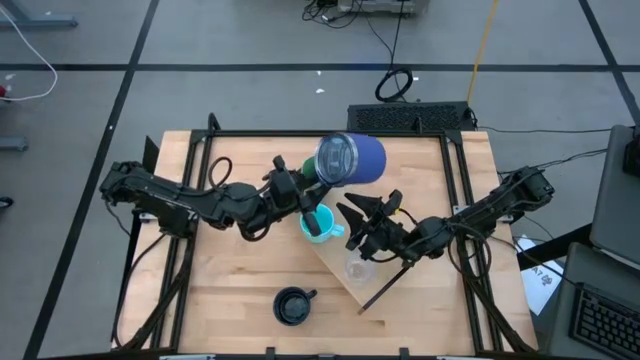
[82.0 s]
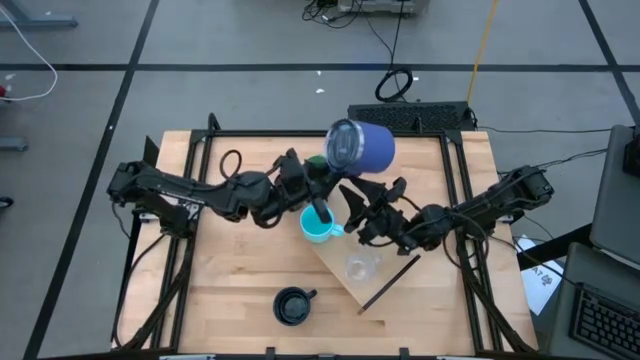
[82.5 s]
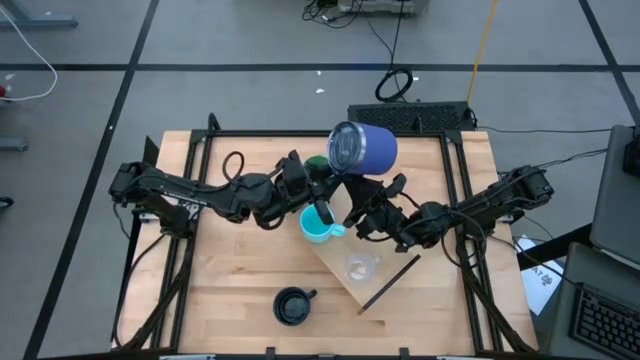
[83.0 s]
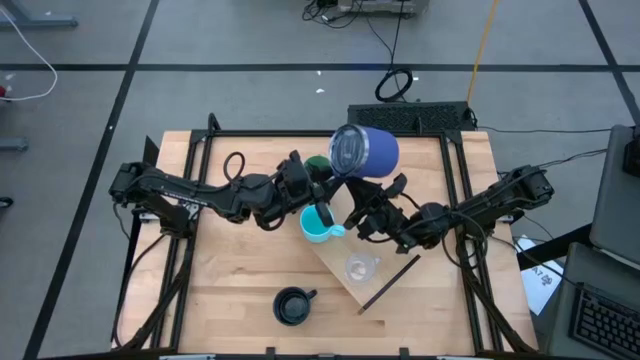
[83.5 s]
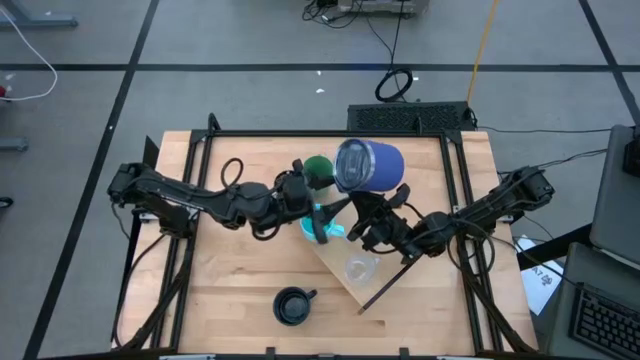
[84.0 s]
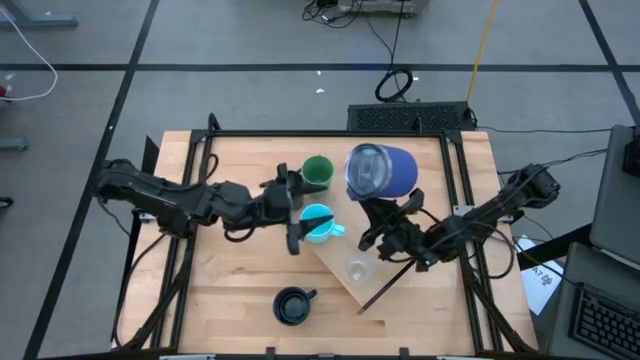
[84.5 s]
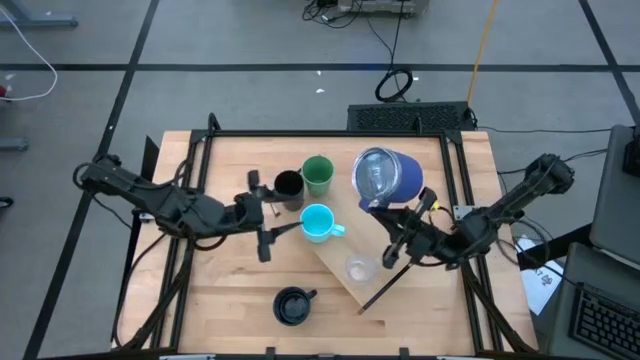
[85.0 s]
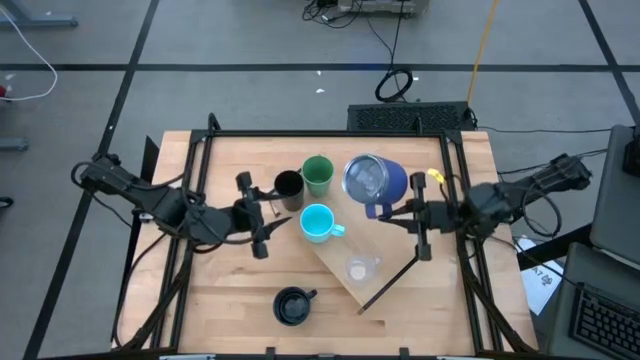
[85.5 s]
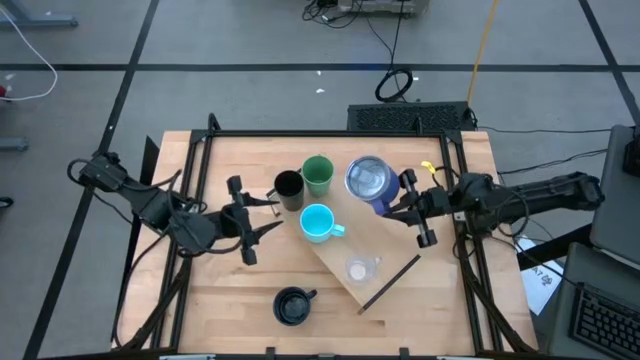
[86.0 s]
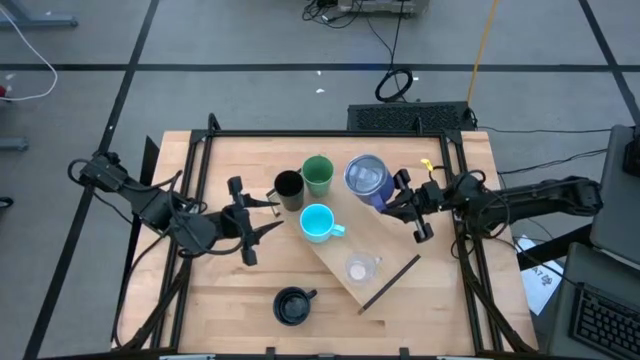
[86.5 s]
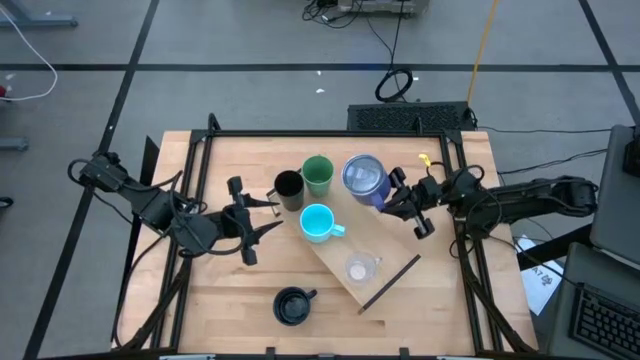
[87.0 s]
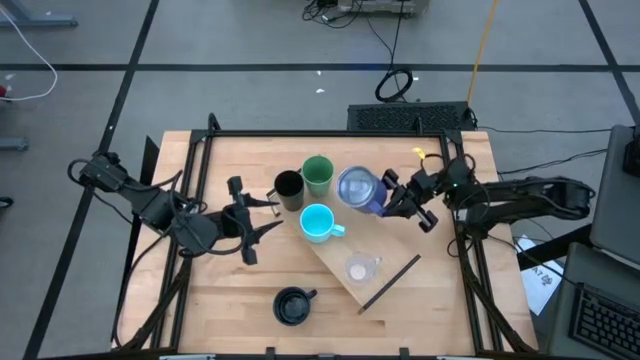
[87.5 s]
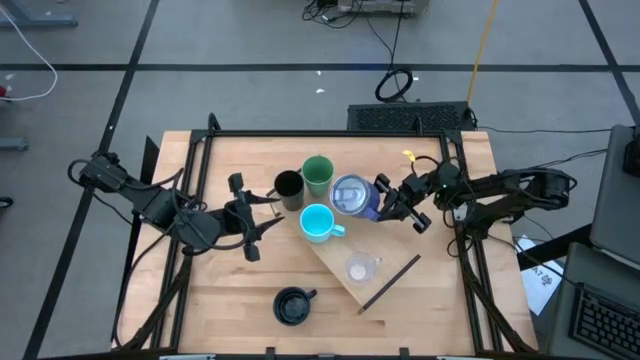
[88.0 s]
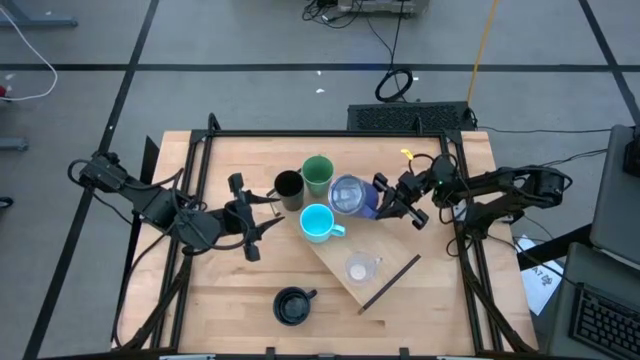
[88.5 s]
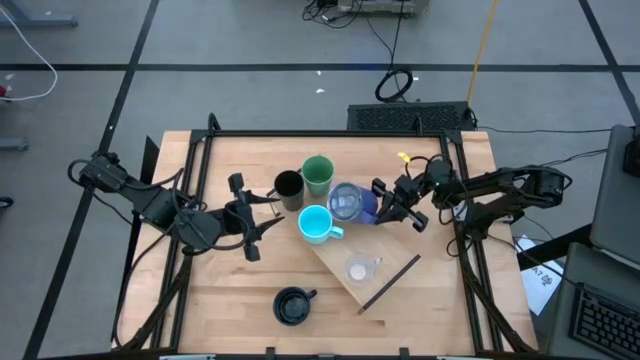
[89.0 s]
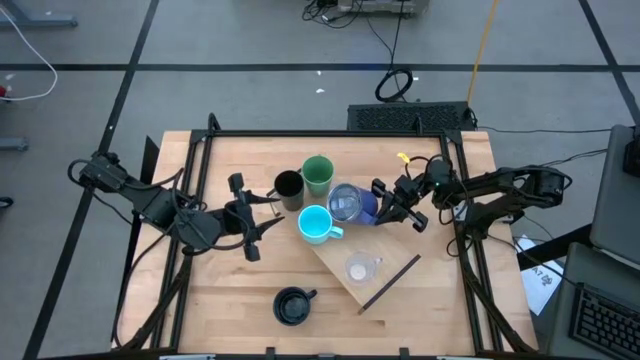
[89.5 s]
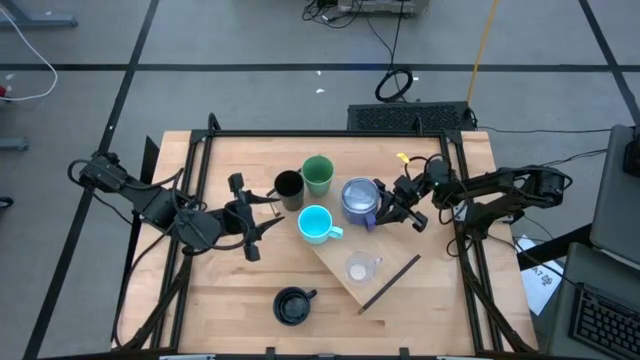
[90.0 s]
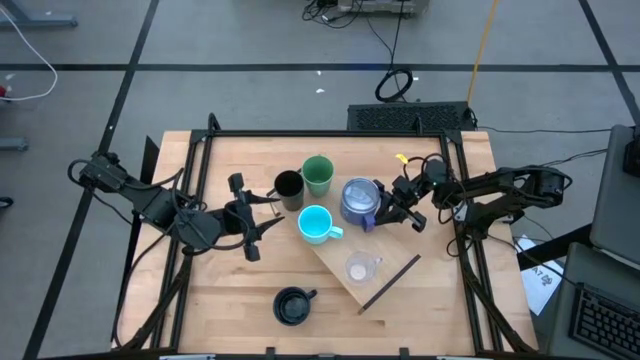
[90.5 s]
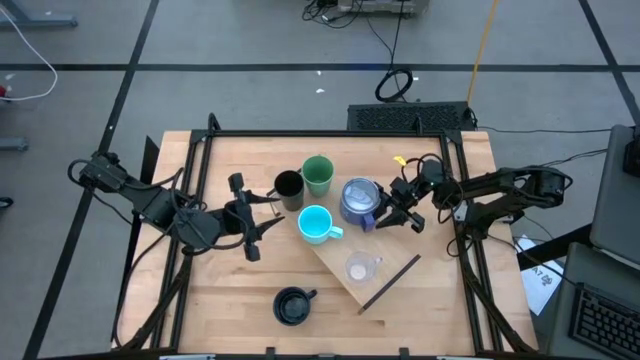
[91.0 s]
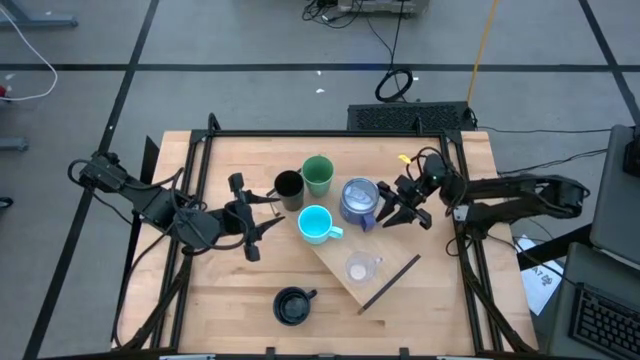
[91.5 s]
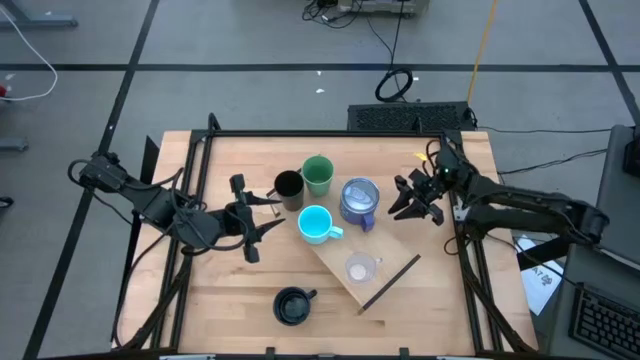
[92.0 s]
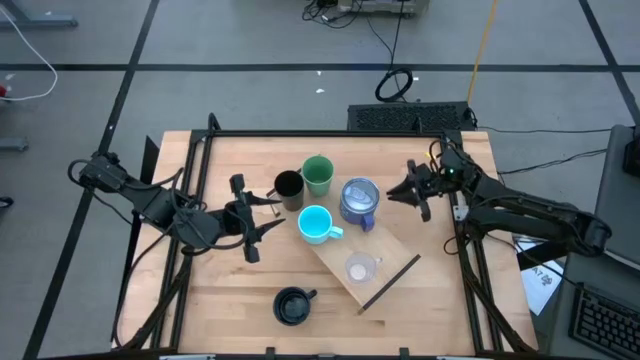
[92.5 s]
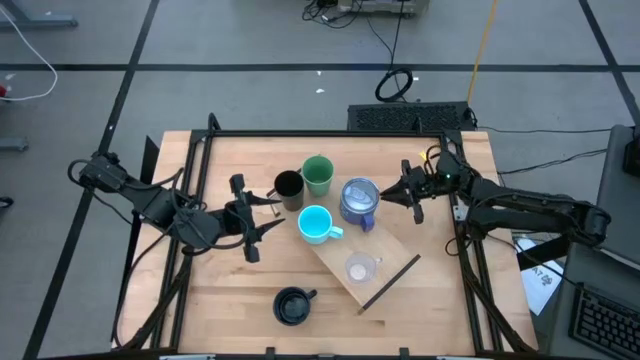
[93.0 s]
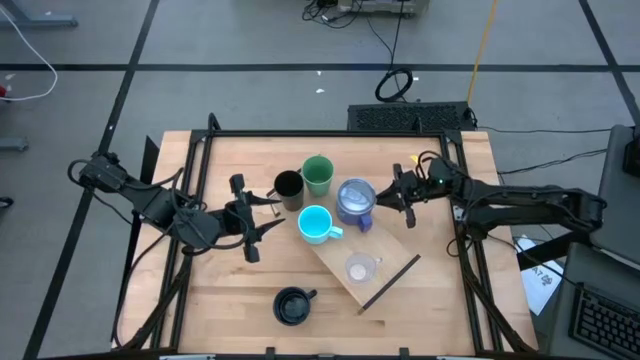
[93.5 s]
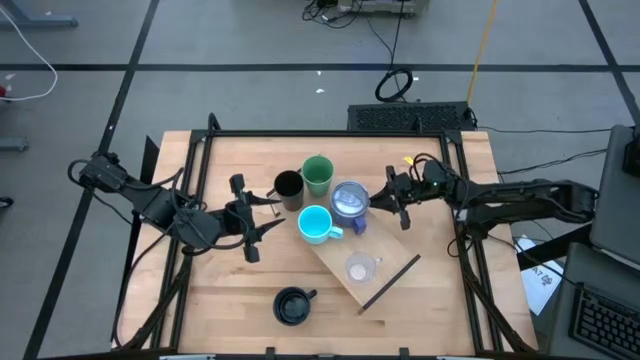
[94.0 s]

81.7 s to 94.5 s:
Task: Stack small to large cups/mugs on shelf
Put the purple mug on the shelf

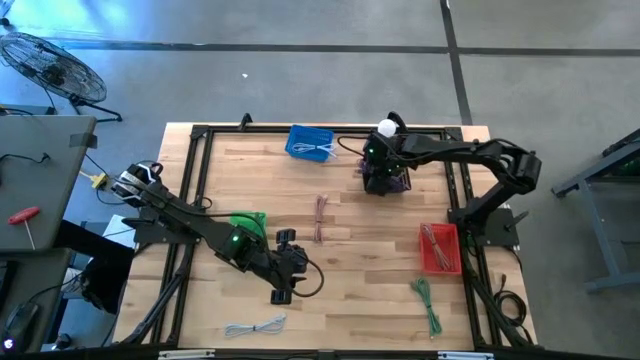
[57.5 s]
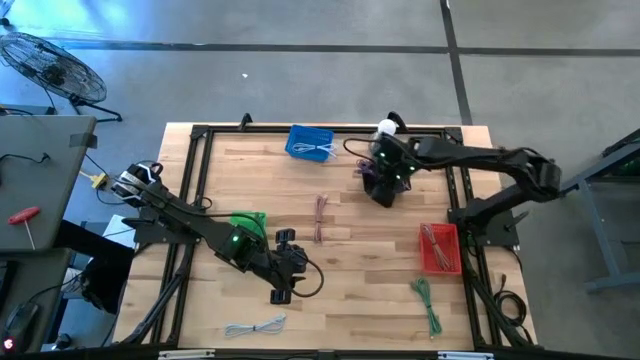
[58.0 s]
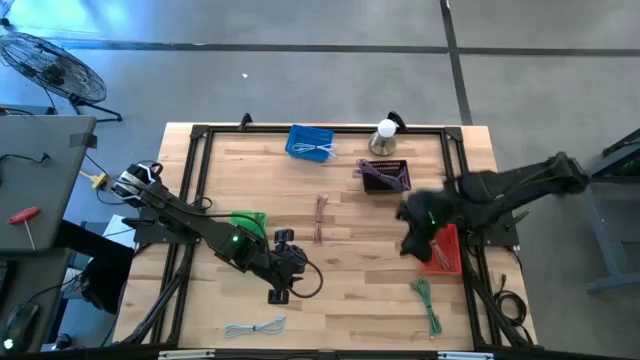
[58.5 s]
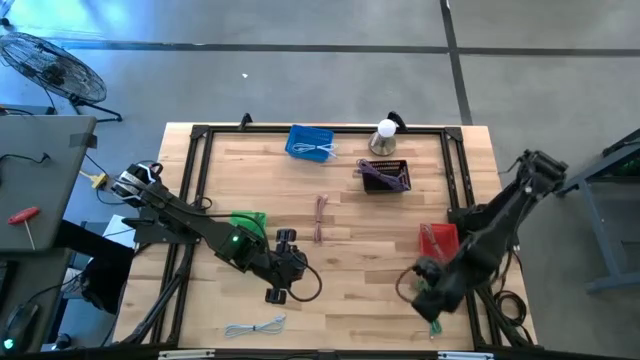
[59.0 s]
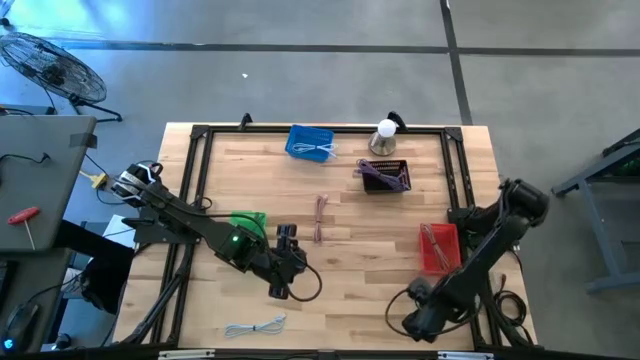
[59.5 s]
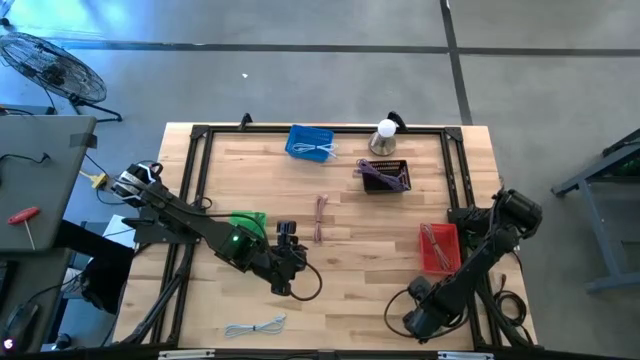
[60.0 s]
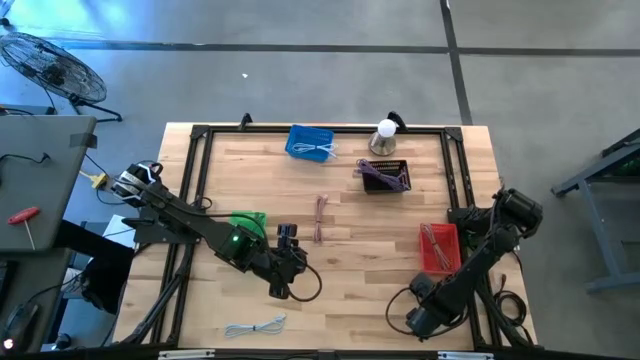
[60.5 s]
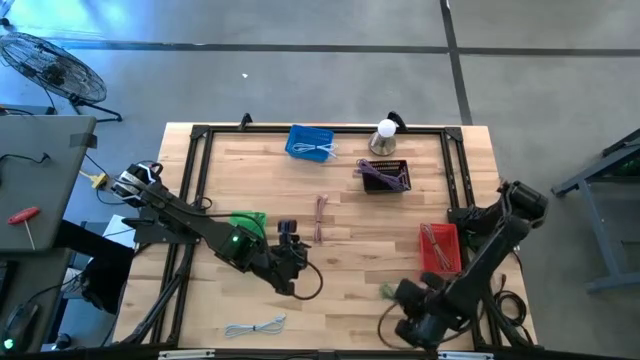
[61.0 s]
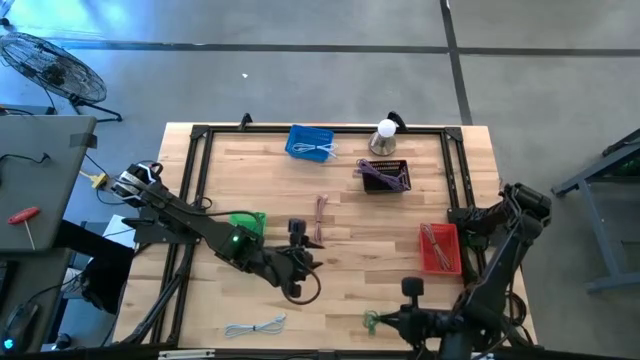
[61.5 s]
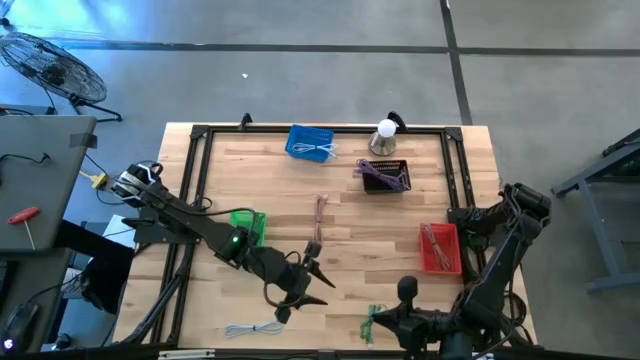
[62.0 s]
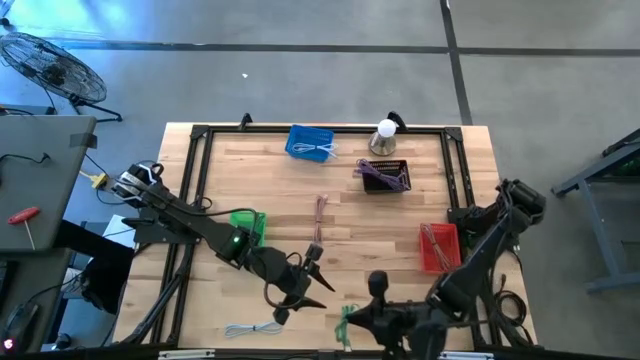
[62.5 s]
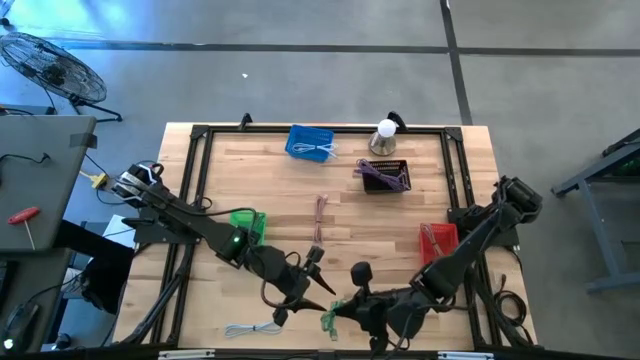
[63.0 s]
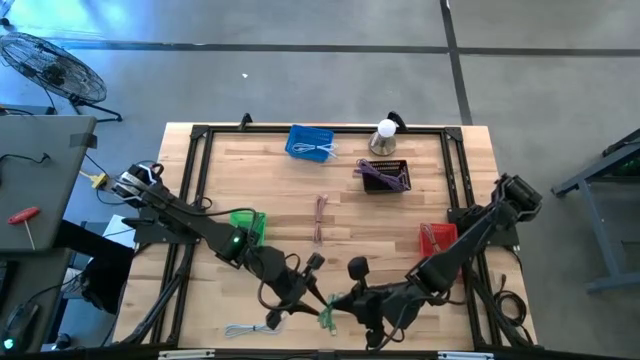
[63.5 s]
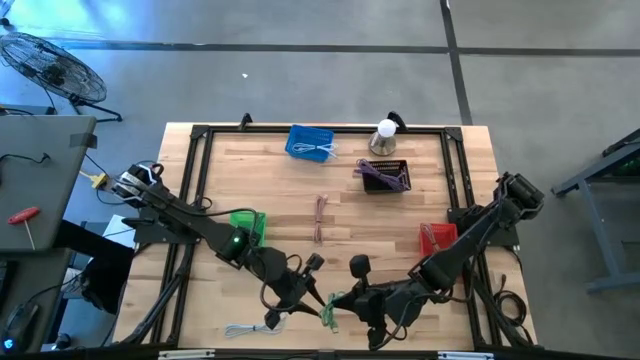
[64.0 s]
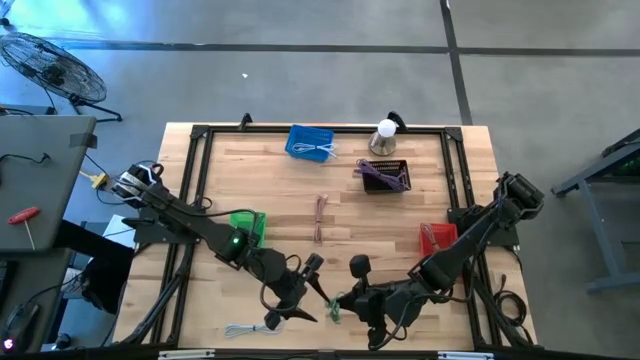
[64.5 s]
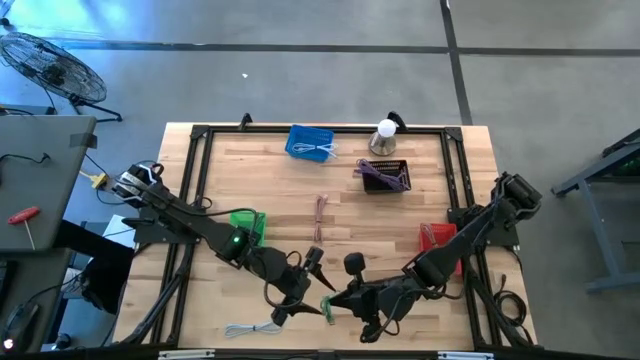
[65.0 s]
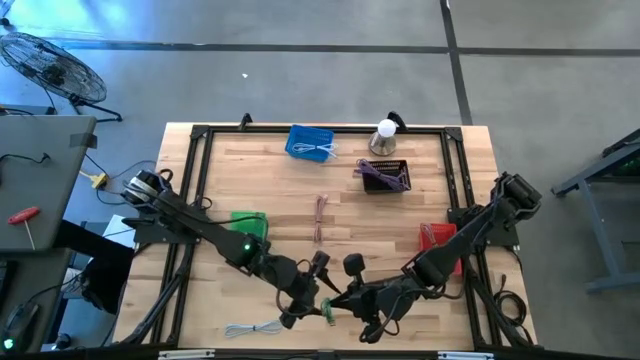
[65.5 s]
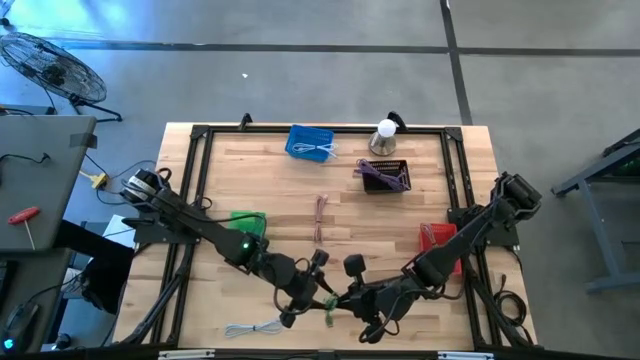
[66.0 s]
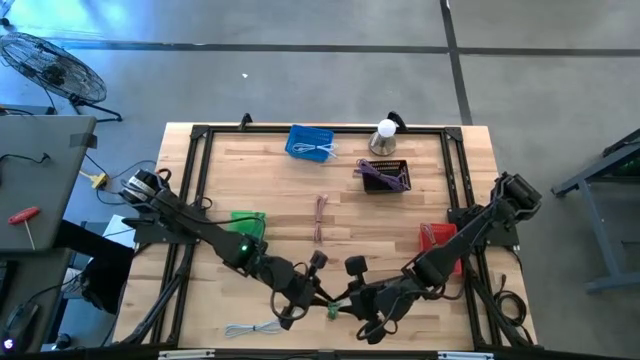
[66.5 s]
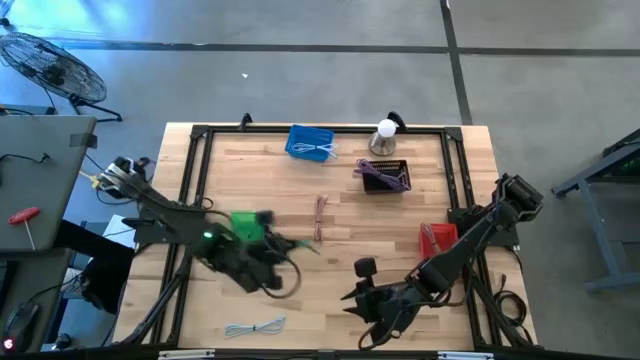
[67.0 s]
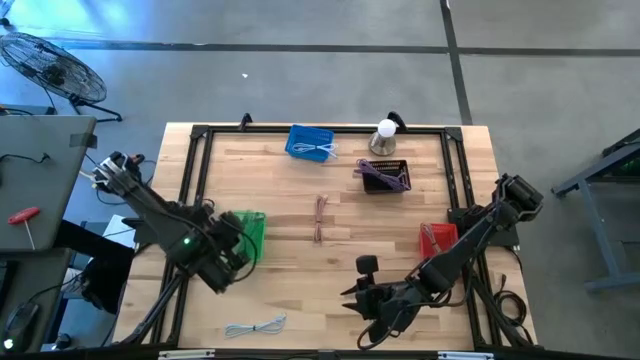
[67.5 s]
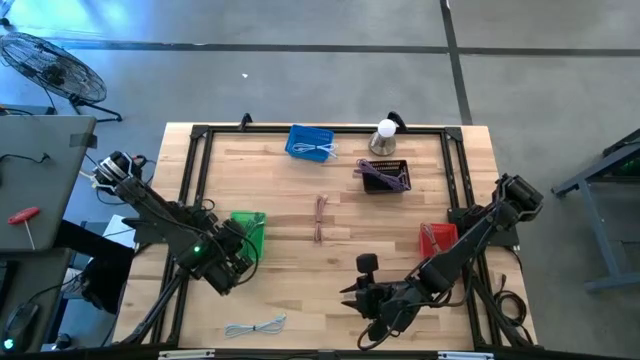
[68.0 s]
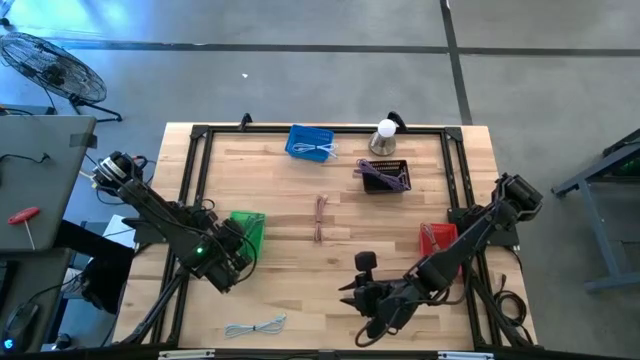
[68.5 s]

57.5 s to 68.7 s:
Task: Pick & Place USB Port
Put the green charger cable into the green bin
